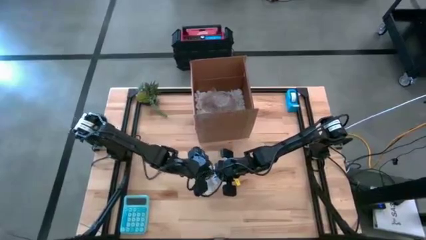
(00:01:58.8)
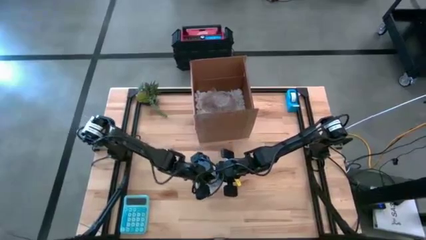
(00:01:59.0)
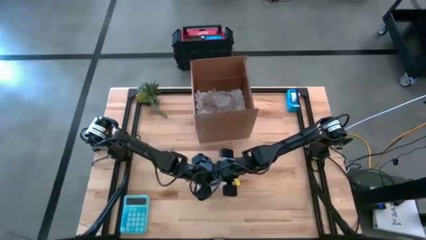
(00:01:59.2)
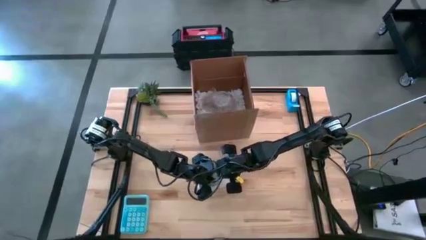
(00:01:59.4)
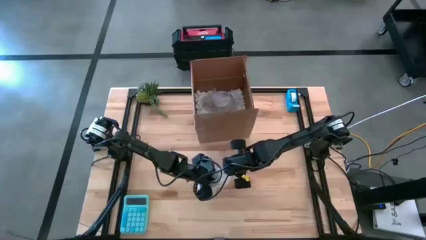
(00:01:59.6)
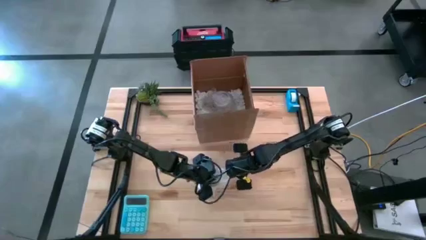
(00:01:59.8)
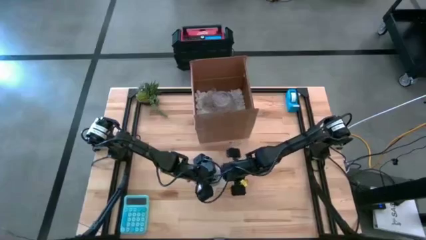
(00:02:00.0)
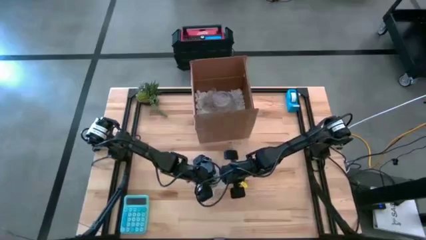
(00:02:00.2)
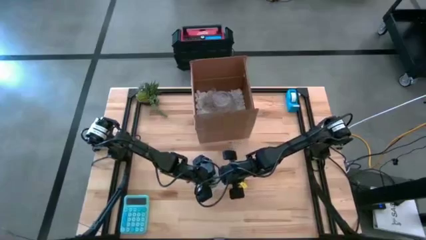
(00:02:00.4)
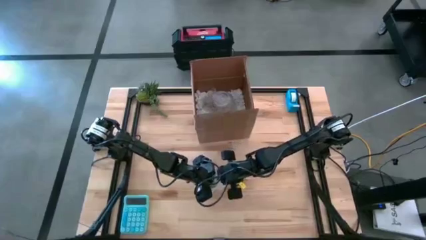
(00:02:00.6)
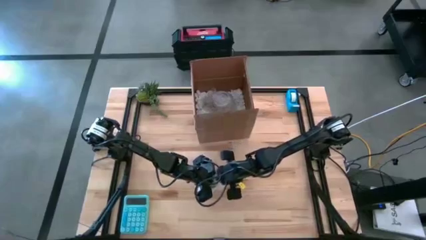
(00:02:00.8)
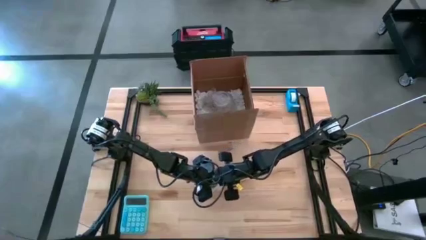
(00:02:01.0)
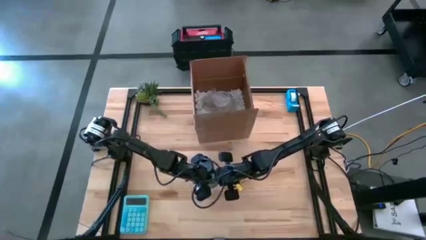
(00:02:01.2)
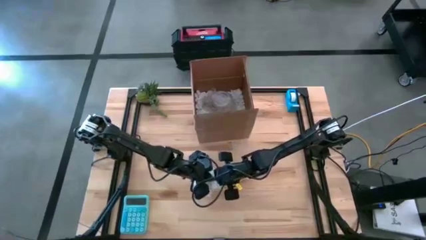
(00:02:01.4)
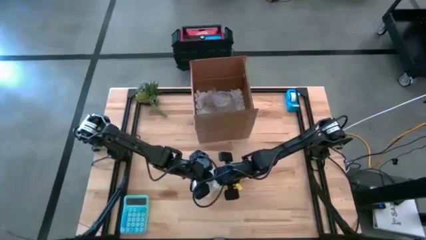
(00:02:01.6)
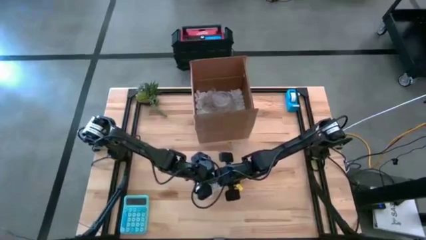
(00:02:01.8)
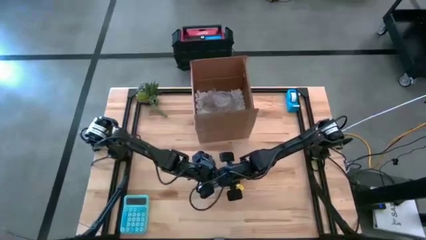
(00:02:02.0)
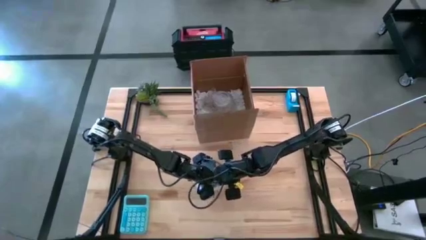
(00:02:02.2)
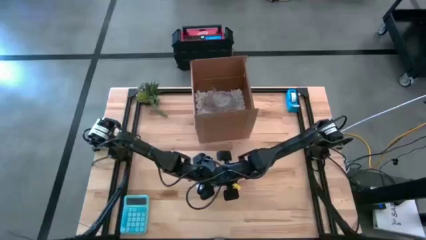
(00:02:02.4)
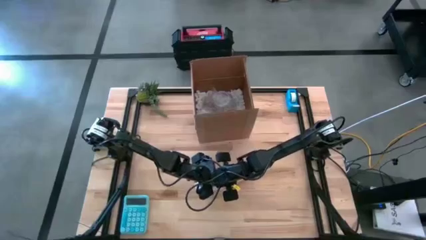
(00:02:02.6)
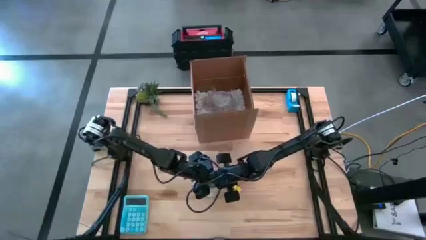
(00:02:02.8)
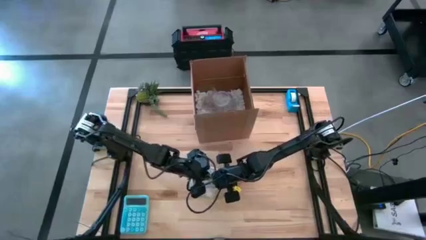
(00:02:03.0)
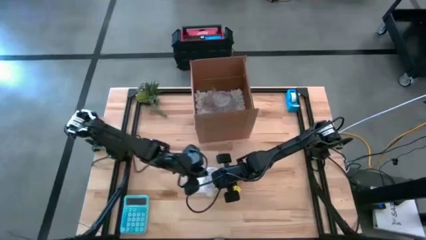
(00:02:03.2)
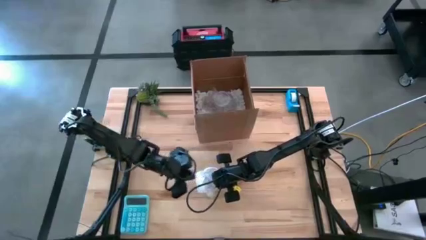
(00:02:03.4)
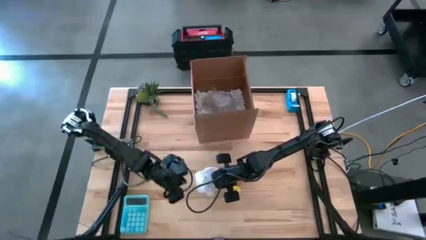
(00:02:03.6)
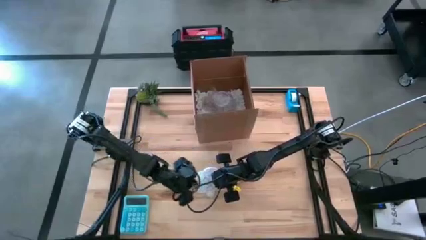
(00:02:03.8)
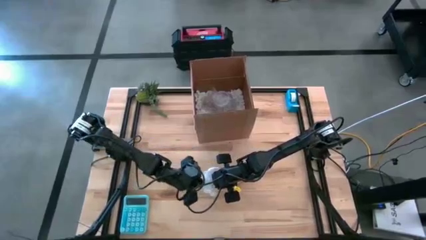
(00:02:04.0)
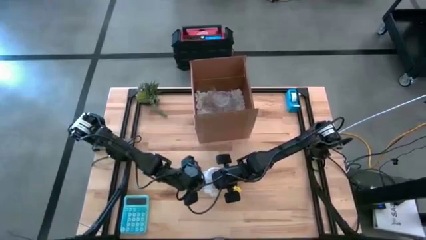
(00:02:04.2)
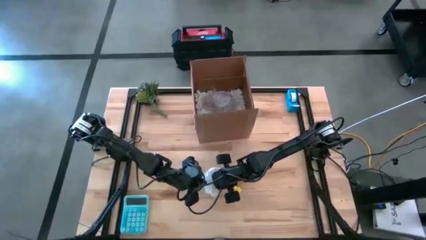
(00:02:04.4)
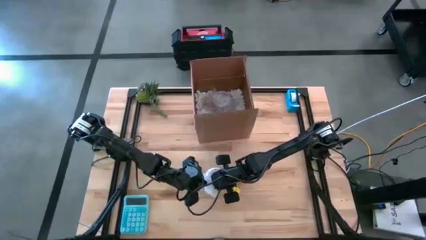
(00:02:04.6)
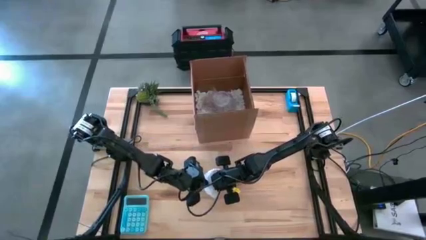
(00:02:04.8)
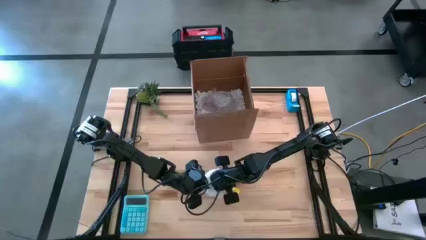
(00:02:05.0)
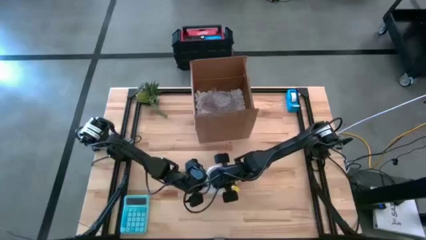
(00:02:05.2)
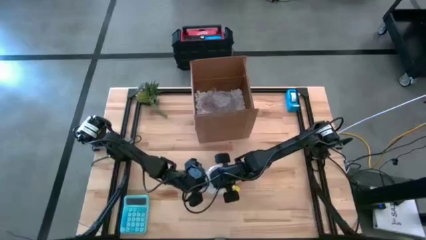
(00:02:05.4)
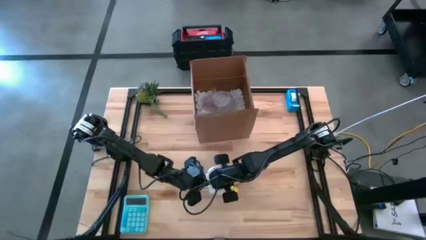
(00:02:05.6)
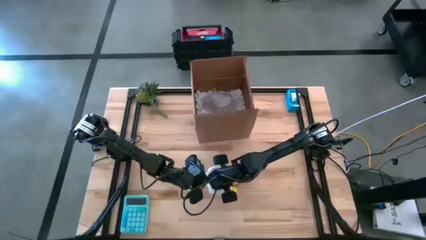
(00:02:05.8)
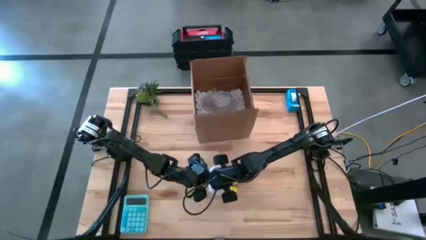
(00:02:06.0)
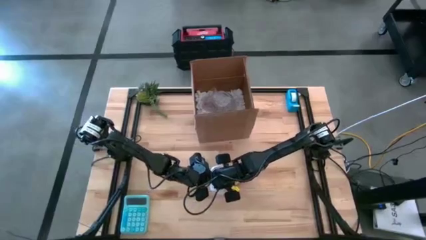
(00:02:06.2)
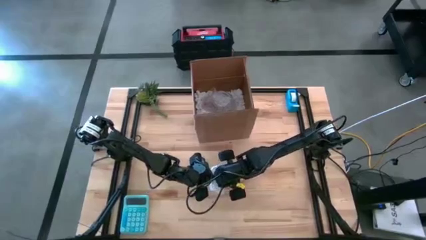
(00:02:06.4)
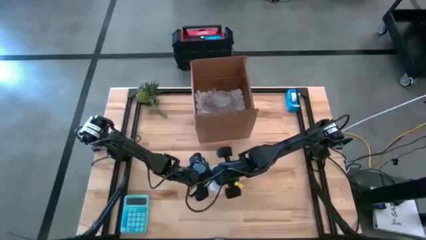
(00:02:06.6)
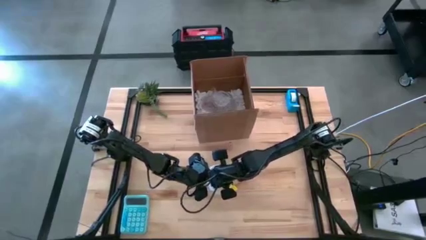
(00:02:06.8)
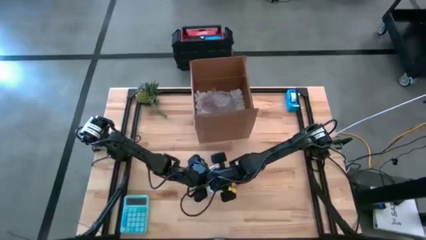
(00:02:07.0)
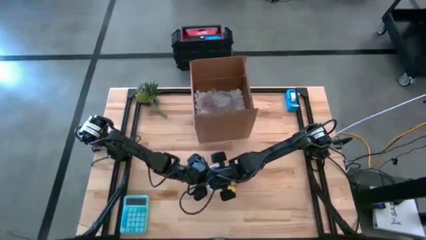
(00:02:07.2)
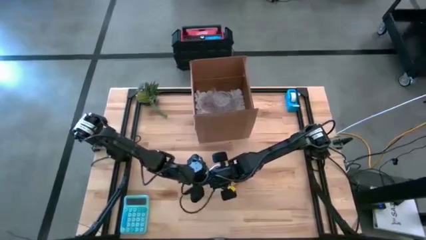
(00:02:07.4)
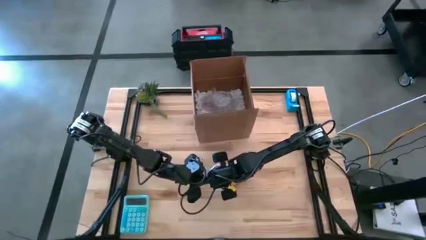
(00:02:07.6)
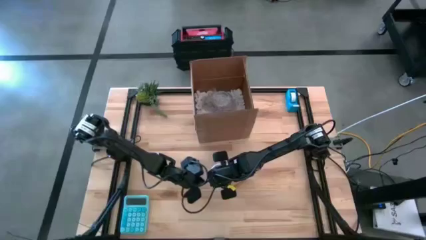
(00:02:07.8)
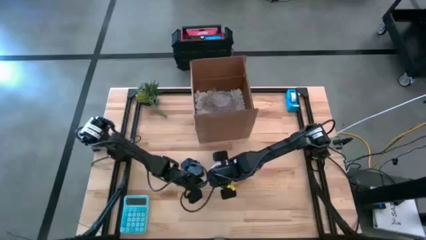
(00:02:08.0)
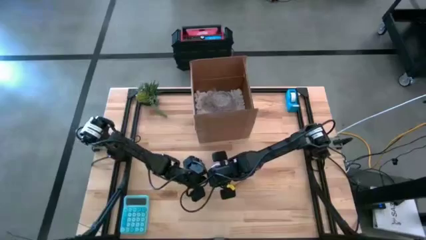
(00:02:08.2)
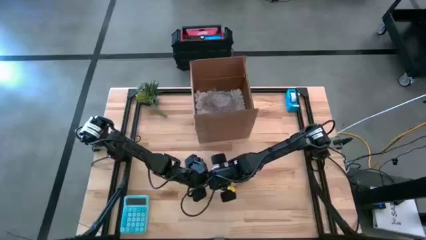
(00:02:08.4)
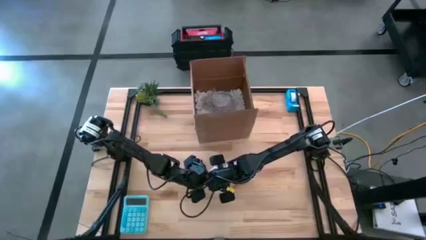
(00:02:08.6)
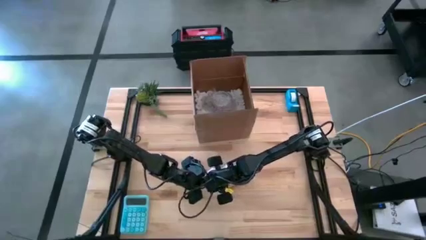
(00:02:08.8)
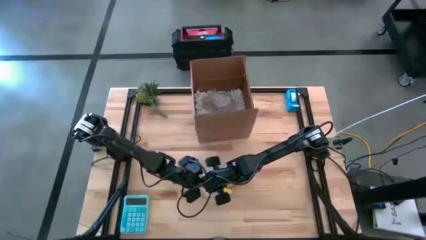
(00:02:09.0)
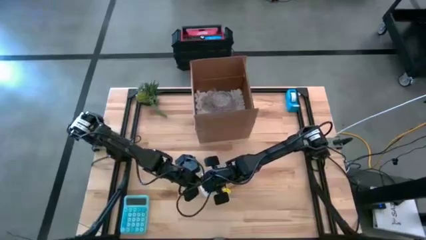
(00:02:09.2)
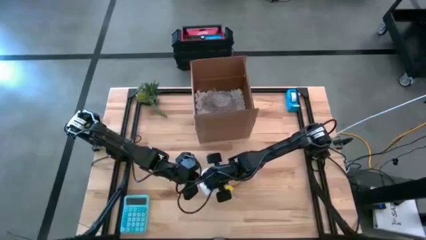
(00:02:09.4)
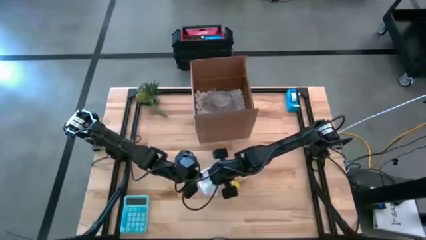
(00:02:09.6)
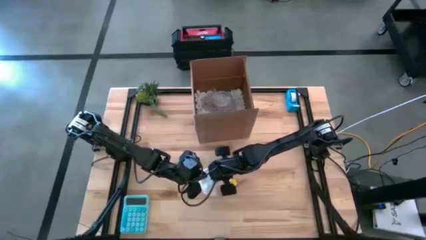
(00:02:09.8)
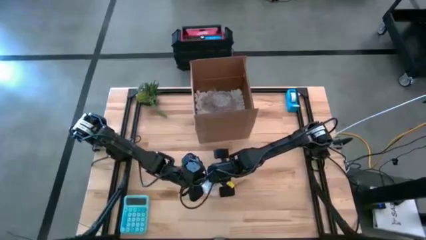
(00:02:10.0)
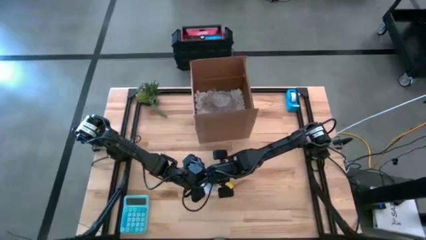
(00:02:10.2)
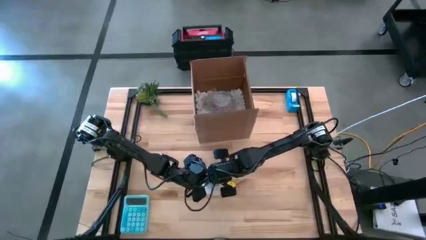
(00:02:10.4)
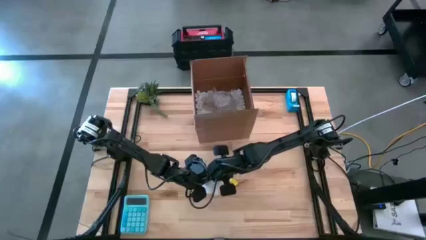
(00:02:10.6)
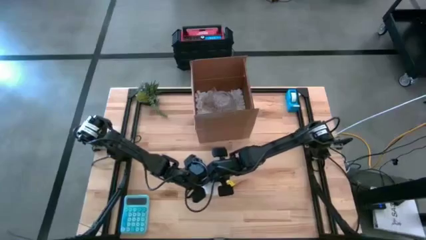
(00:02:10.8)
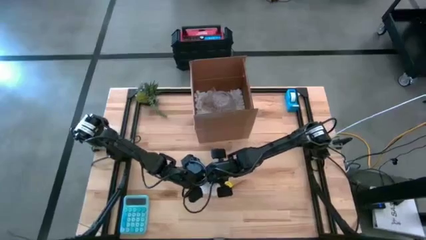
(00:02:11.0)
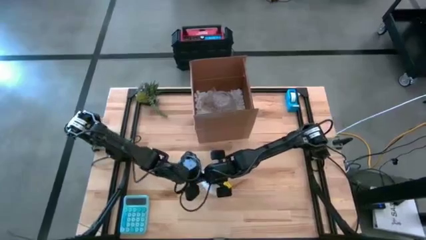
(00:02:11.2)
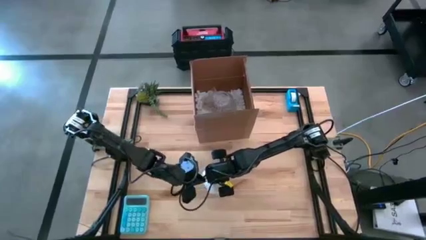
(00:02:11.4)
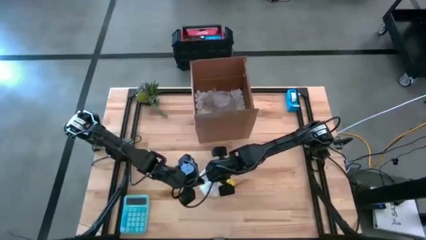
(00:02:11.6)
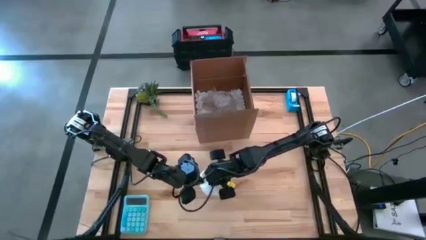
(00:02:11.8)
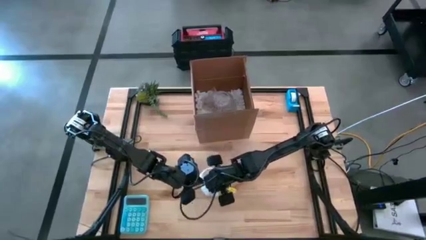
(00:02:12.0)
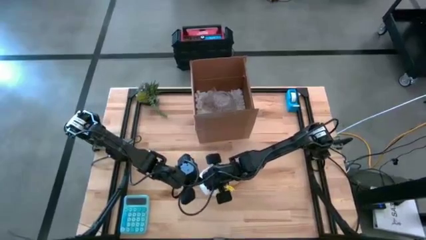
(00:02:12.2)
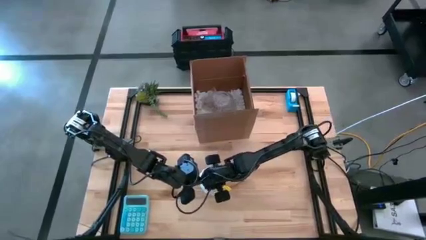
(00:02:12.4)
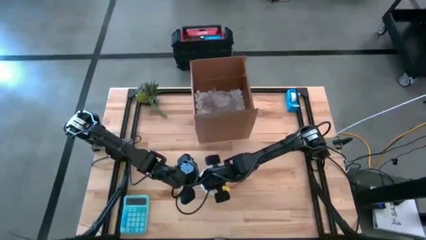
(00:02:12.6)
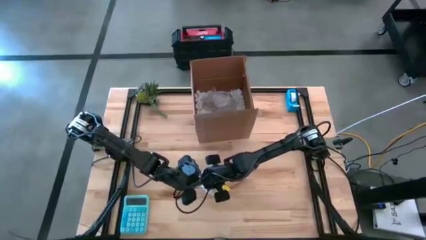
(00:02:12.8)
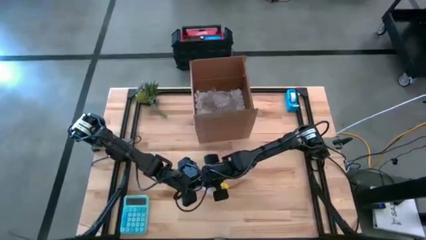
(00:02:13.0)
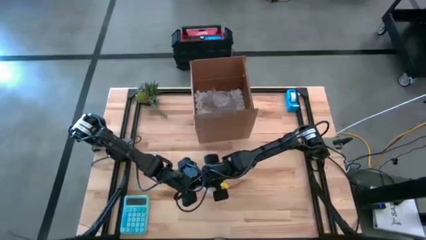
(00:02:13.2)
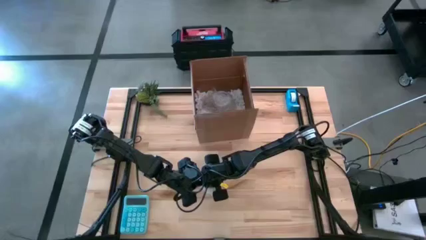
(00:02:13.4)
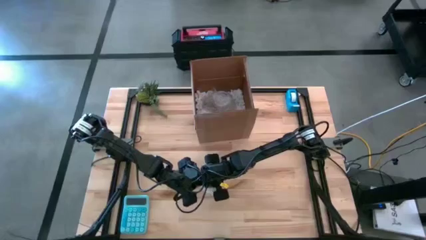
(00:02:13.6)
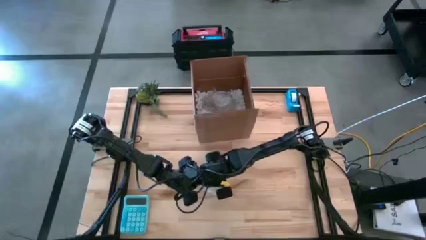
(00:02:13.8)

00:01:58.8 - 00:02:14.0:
Task: wrap mug
Wrap the gray mug with the bubble wrap

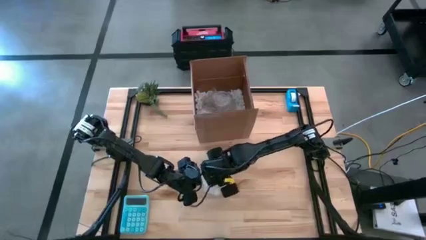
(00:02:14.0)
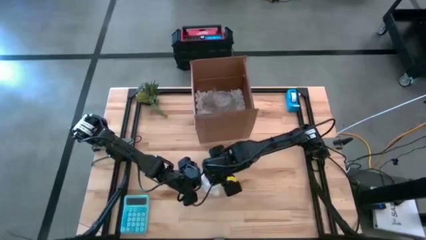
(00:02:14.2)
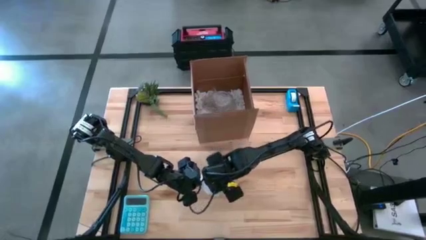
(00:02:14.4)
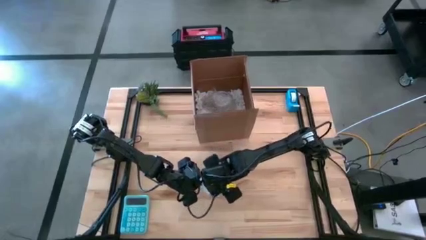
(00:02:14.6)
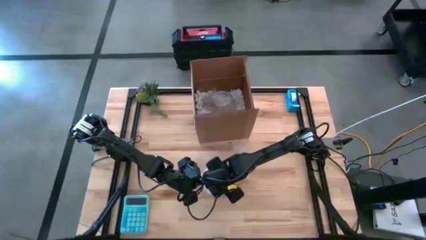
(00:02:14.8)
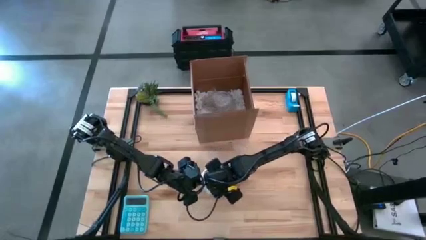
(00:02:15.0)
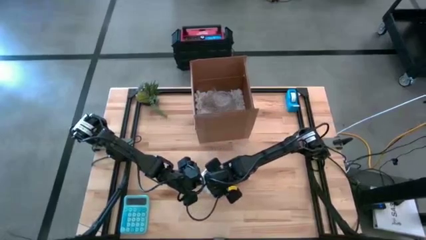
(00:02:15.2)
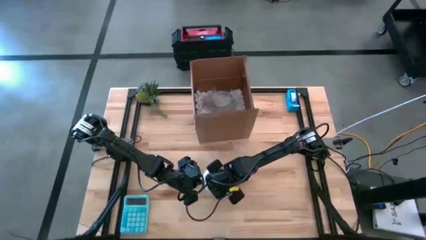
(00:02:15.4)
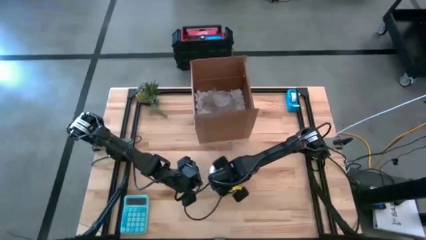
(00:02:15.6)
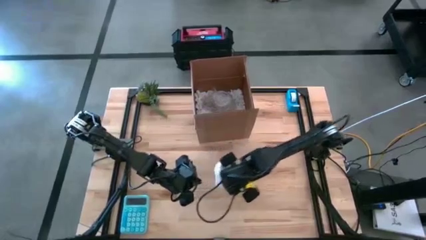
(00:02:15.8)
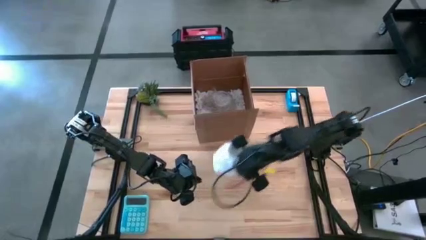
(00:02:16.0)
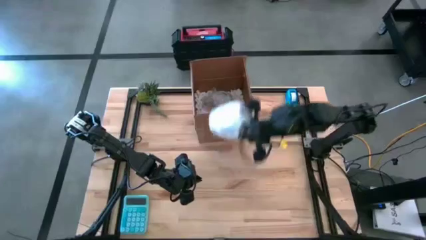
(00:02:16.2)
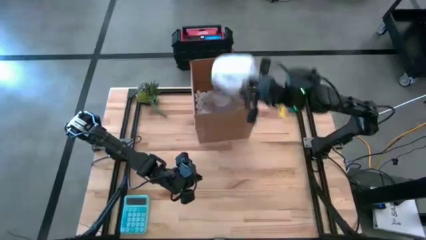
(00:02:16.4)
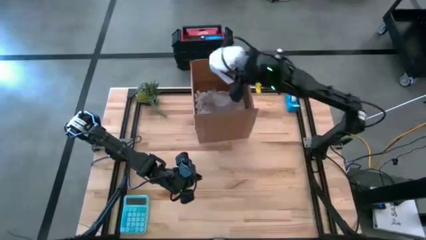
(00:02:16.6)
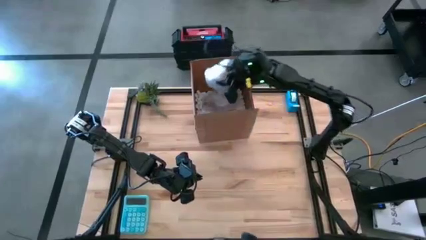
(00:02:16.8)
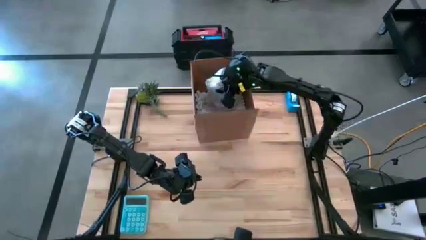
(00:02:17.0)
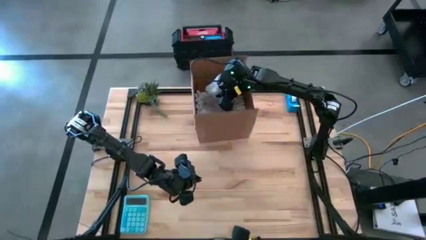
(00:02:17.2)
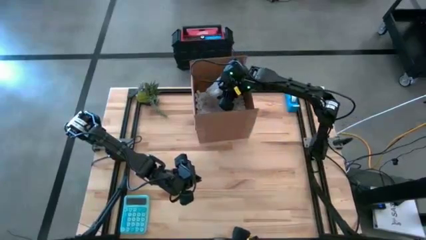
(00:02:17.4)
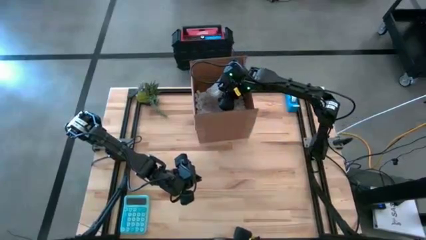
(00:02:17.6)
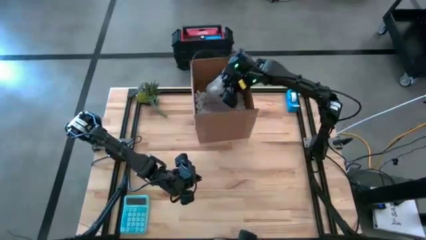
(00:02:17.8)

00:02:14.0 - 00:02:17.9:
Put the wrapped gray mug into the cardboard box
